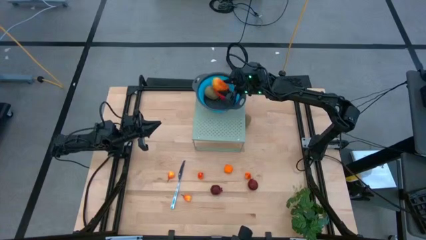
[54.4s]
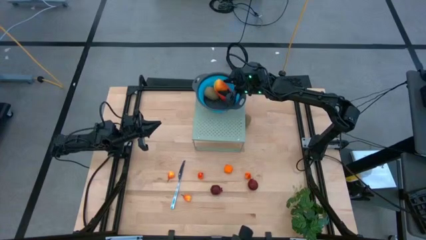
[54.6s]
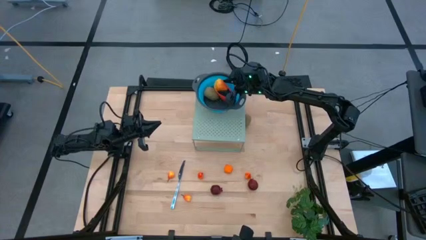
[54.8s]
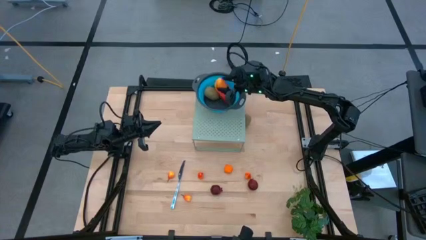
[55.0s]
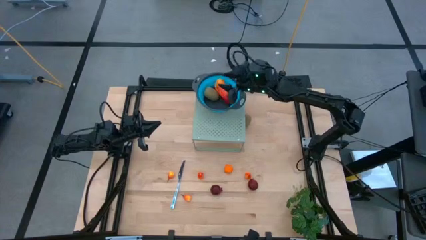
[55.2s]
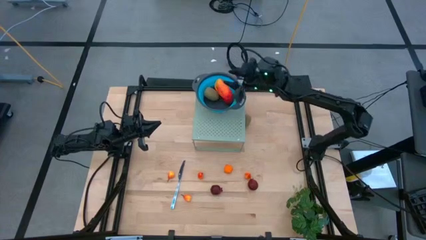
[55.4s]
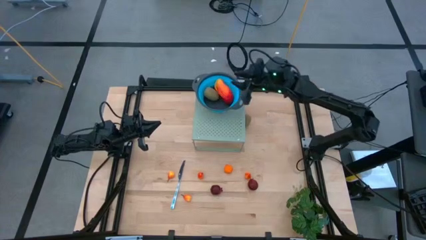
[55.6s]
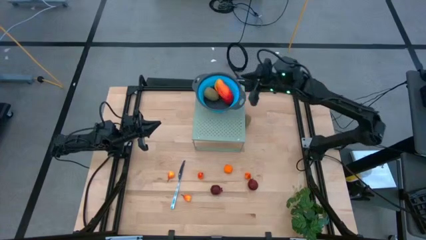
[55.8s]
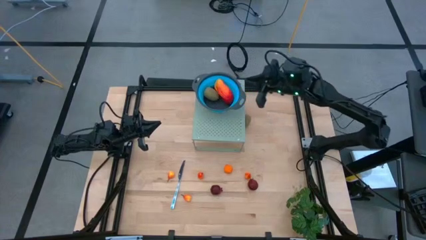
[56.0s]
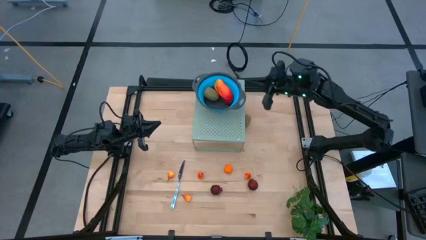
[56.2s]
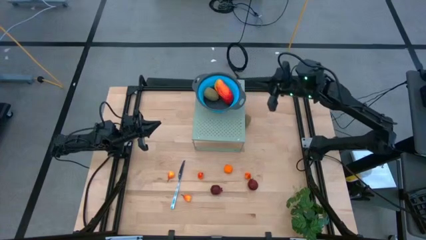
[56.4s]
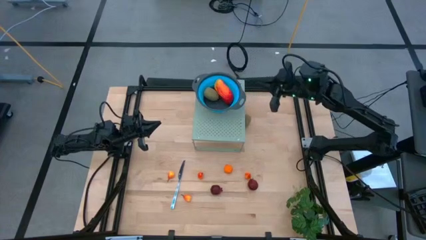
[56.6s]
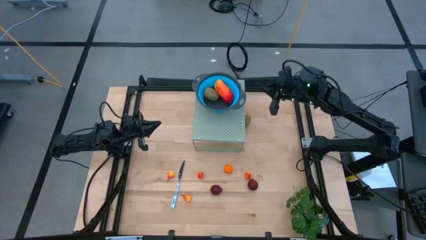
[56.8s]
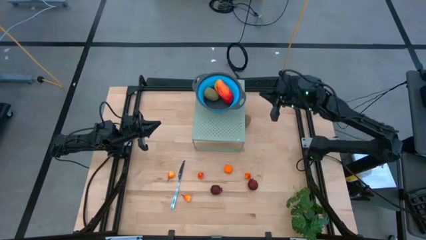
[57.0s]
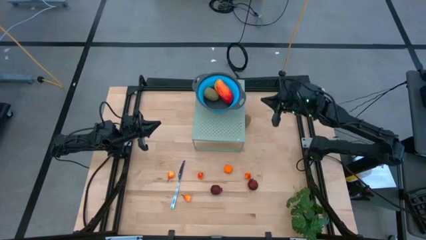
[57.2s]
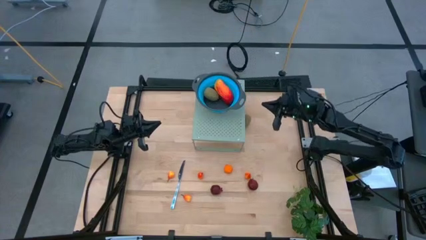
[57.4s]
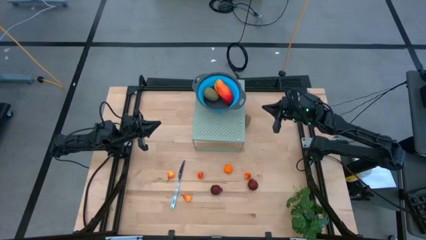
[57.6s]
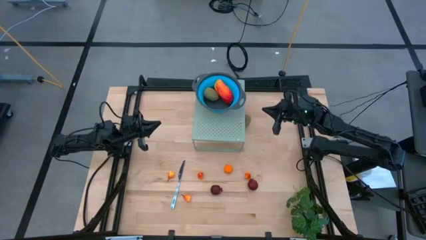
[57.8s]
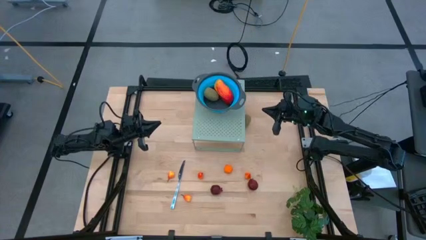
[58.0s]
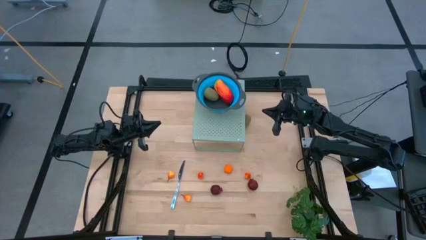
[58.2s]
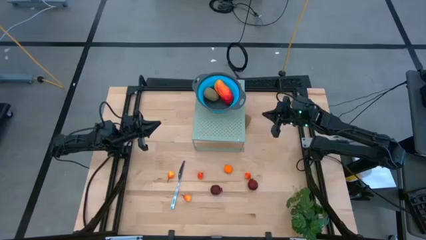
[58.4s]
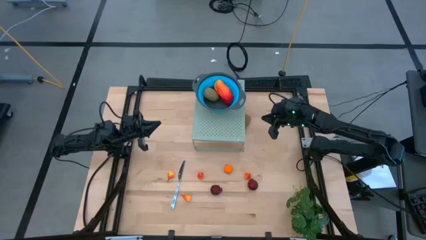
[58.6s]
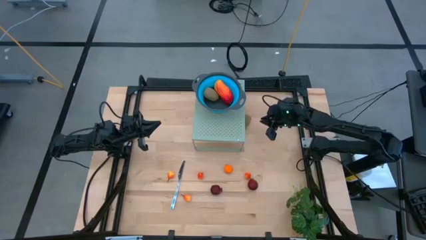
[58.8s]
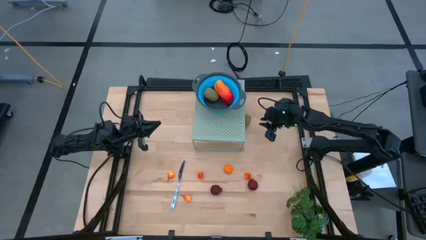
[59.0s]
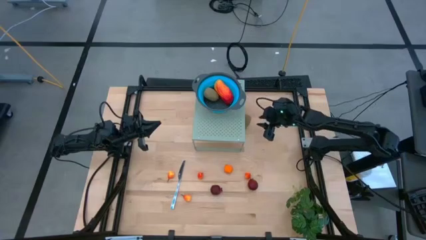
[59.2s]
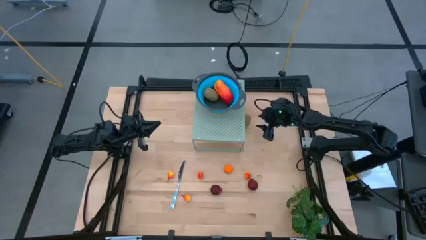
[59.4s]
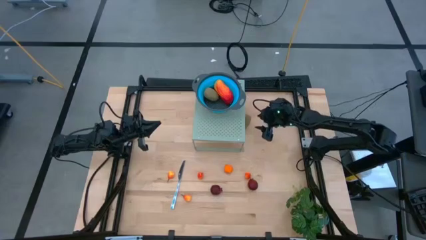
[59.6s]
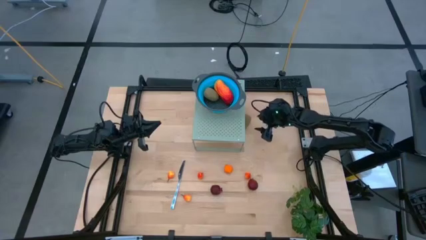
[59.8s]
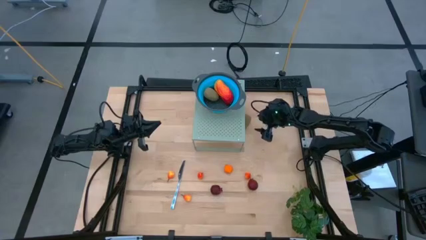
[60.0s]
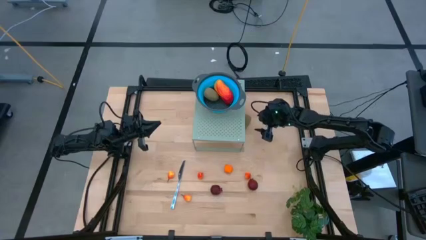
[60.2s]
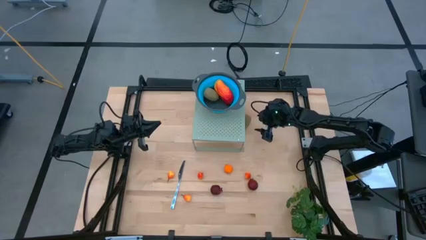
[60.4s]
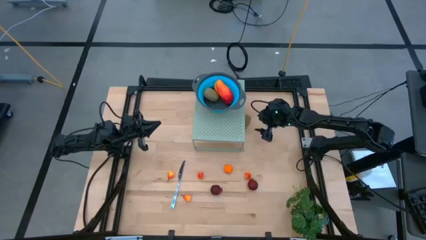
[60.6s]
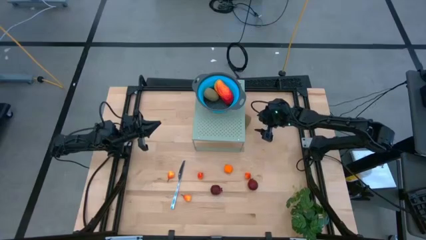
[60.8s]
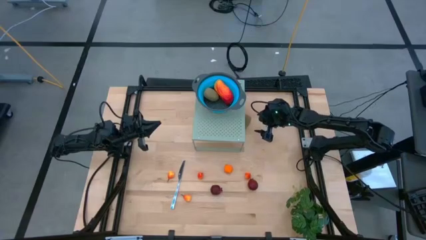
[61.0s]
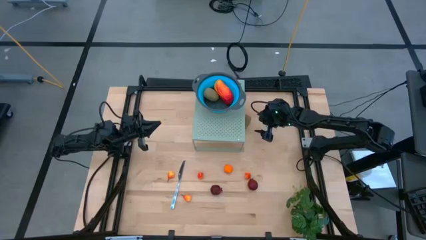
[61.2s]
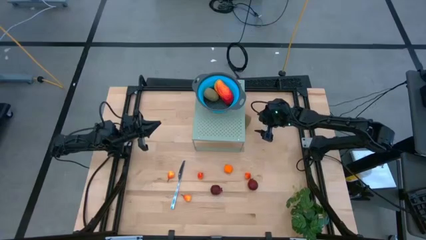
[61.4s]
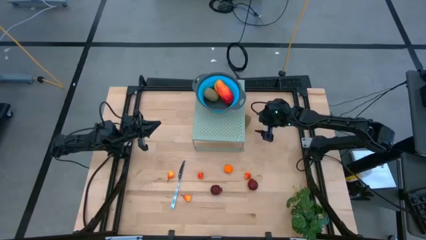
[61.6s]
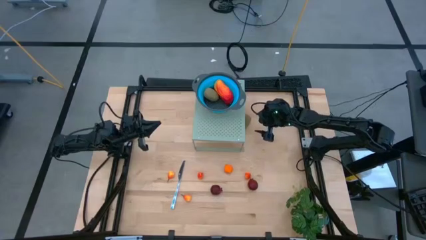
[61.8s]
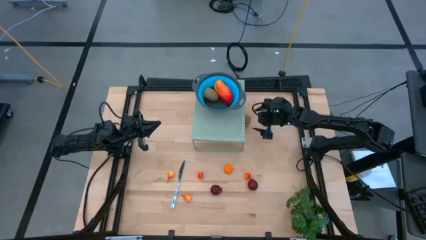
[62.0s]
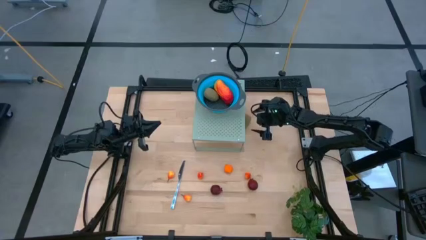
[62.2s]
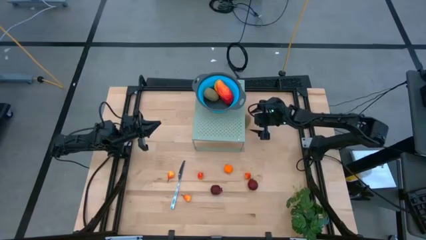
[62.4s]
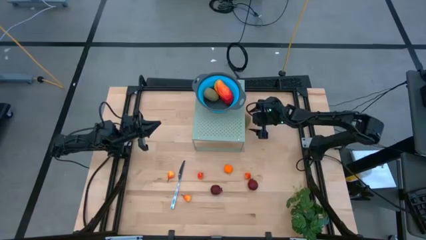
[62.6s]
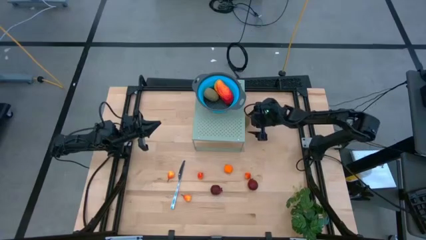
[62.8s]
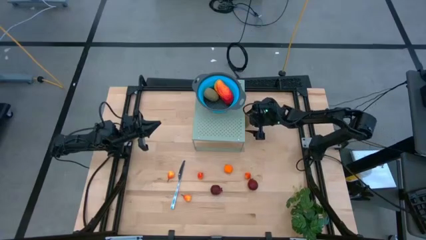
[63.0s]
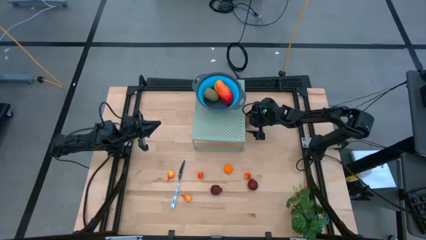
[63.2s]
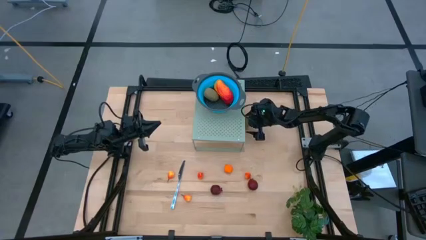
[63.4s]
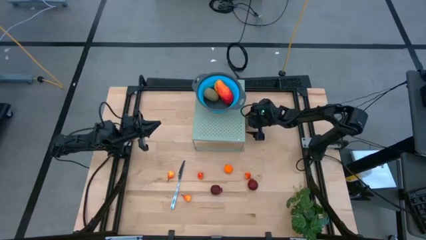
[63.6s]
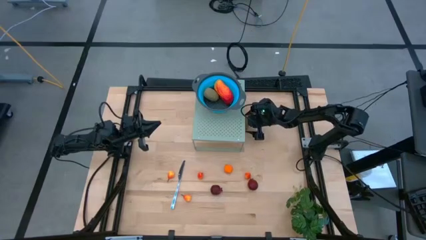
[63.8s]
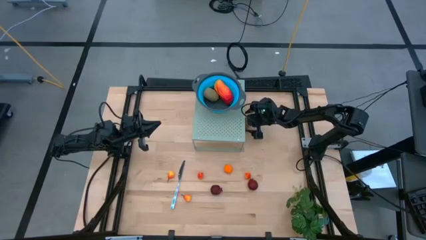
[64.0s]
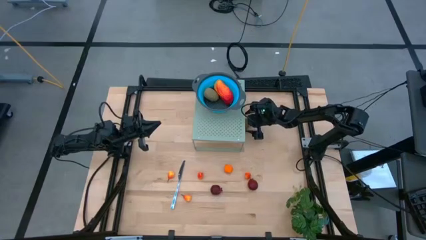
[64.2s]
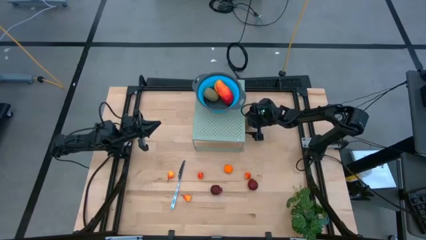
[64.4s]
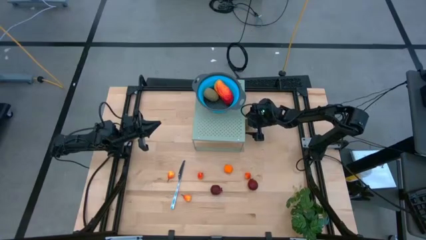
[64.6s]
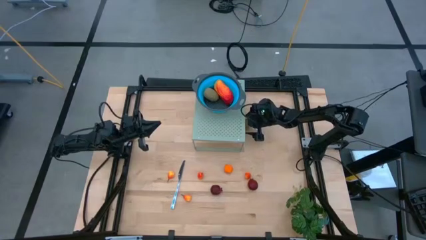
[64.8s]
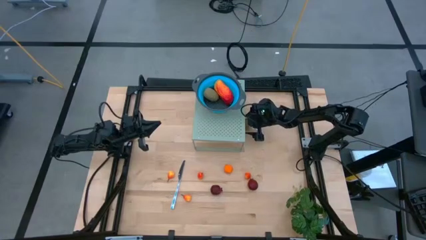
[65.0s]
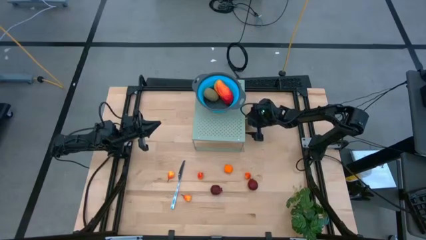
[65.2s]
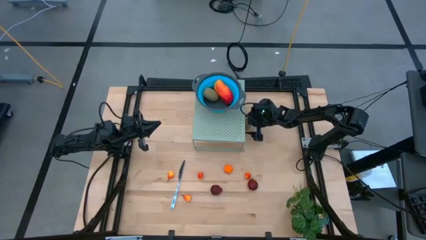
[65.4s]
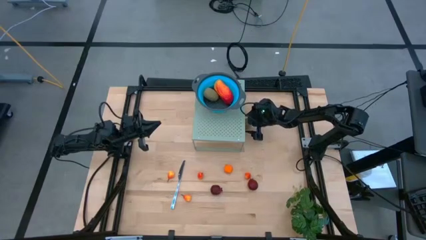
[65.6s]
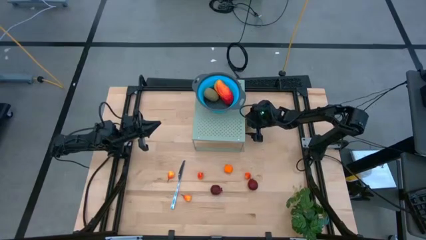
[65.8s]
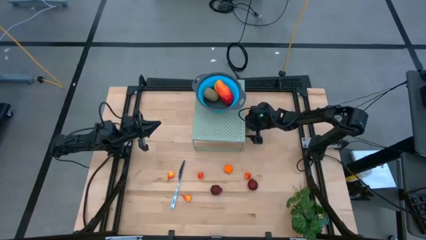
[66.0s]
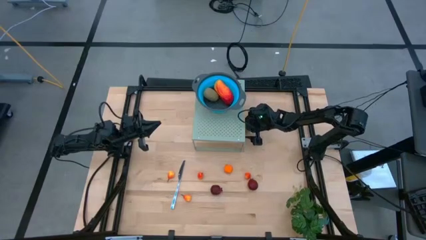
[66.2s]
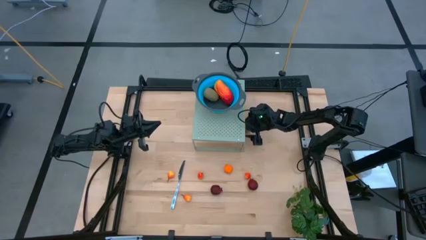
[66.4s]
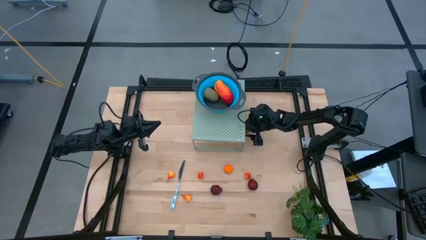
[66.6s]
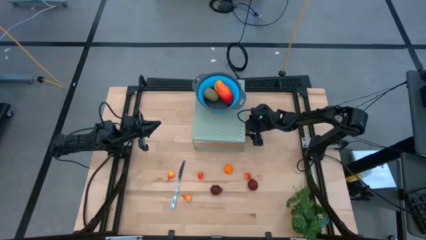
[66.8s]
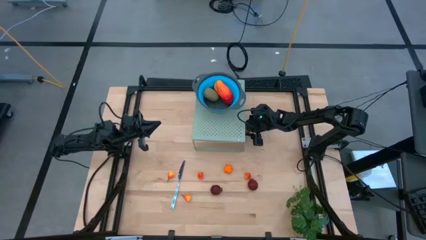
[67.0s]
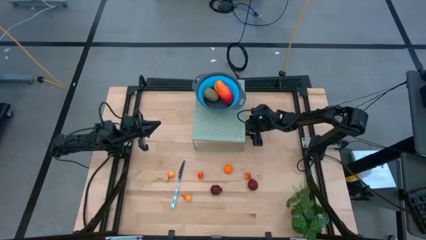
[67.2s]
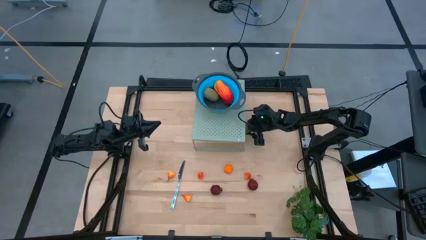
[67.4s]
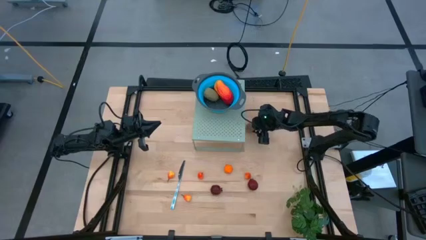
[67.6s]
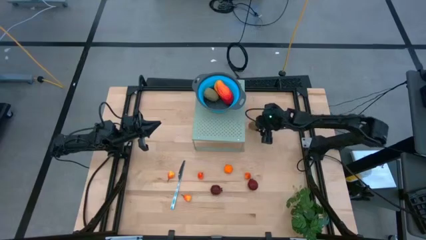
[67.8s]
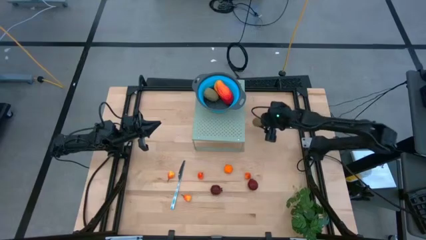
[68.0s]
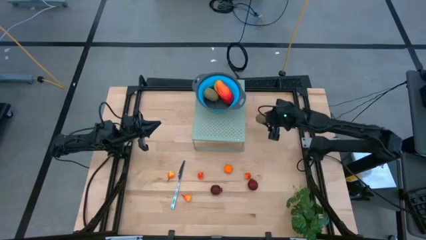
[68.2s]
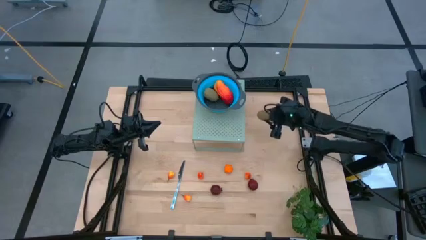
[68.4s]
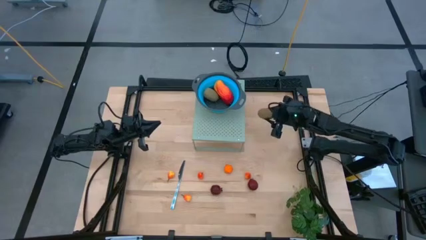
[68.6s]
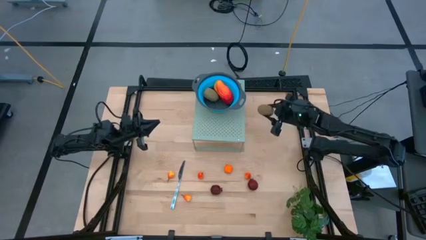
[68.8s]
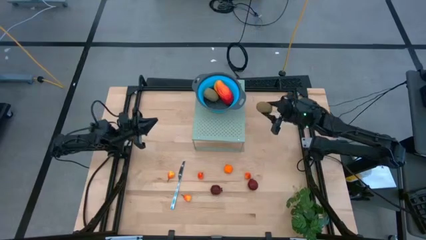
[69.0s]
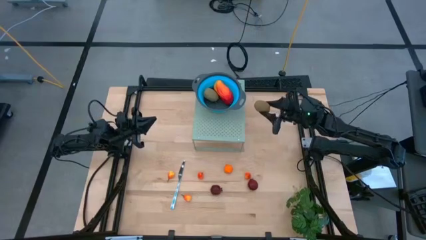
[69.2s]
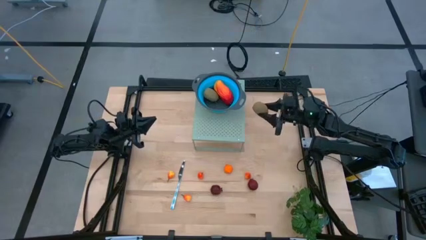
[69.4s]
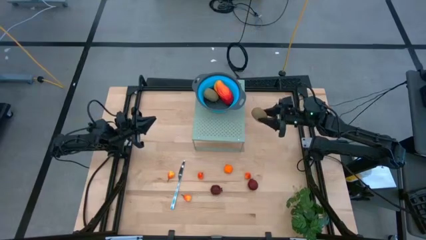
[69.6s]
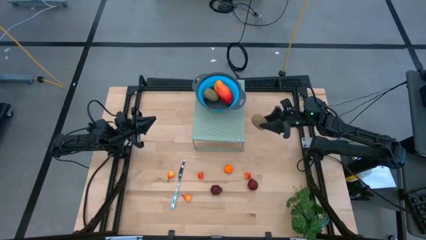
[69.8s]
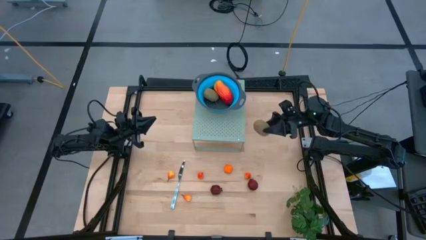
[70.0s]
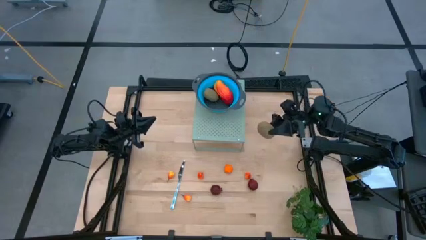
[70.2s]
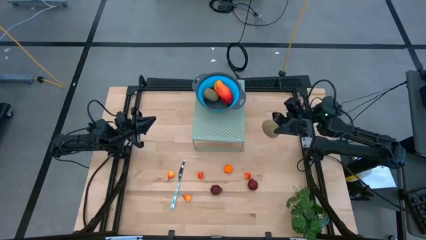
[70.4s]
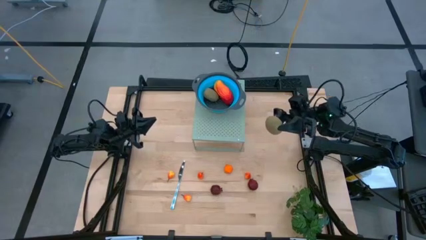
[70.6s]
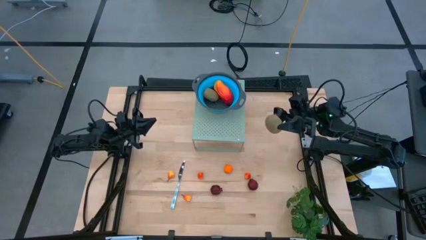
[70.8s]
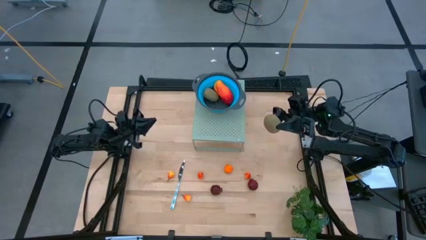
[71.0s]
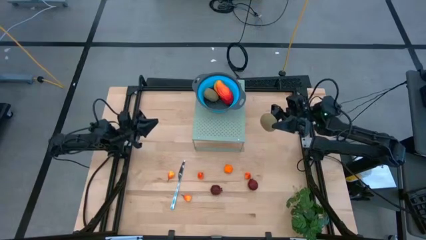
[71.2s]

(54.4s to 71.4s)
Task: Pick & Place Fruit
Put the kiwi into the blue strainer bowl on the shelf
